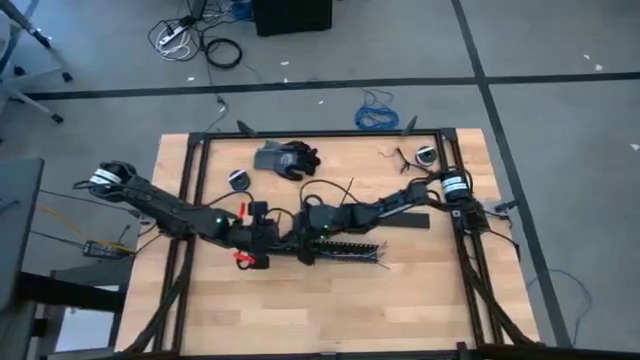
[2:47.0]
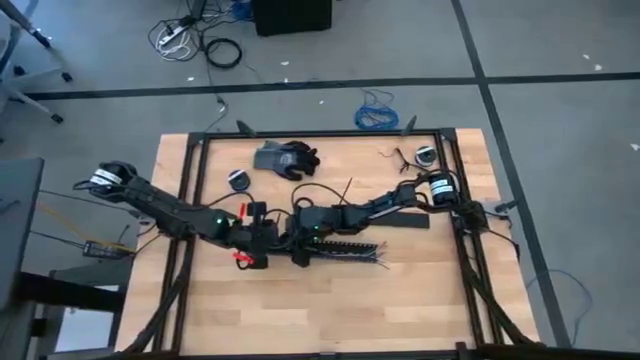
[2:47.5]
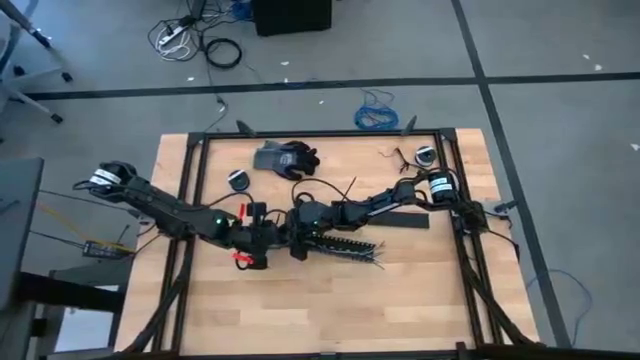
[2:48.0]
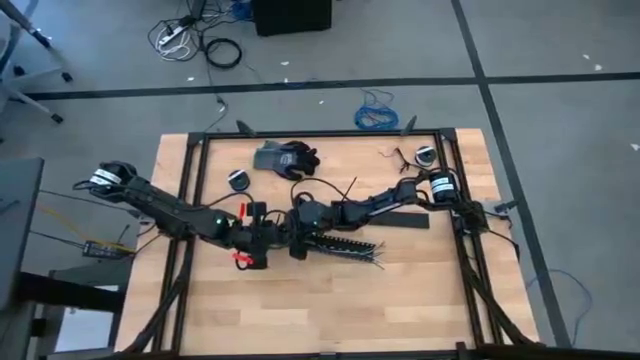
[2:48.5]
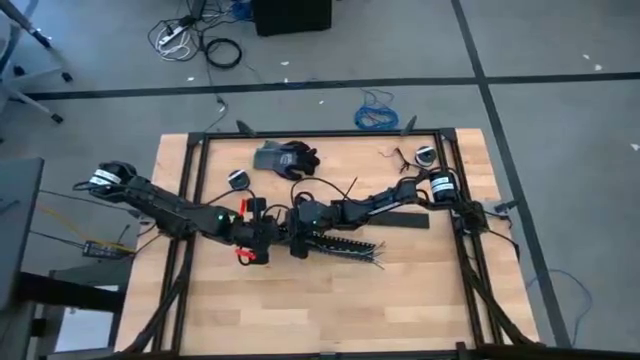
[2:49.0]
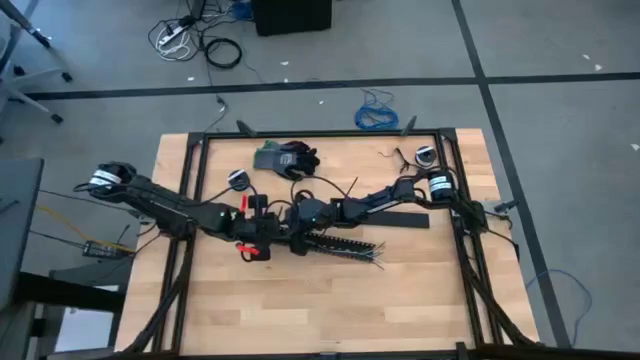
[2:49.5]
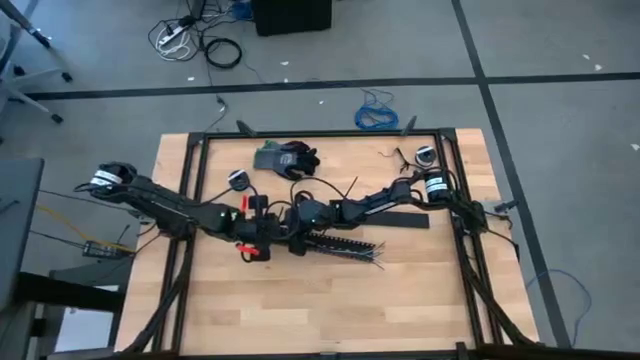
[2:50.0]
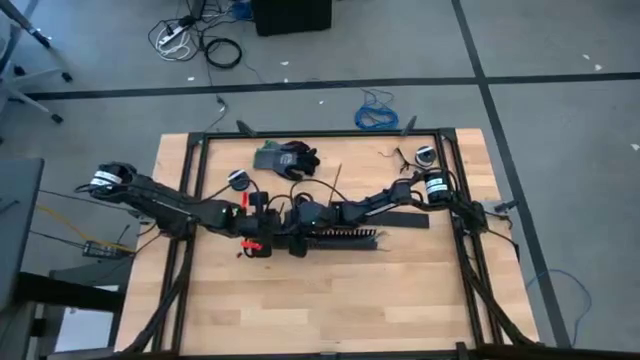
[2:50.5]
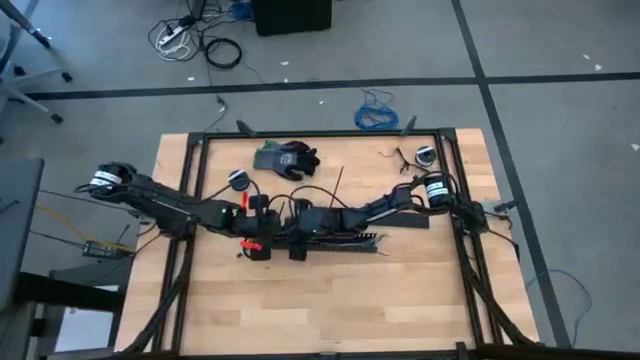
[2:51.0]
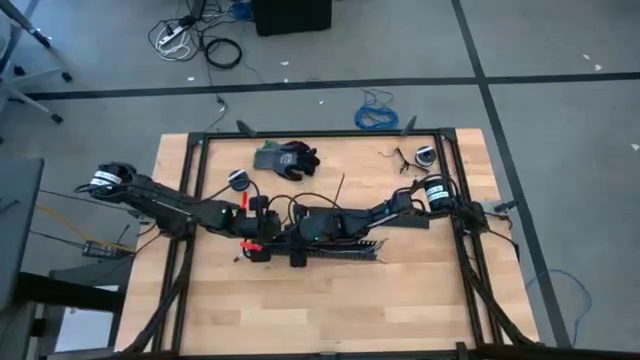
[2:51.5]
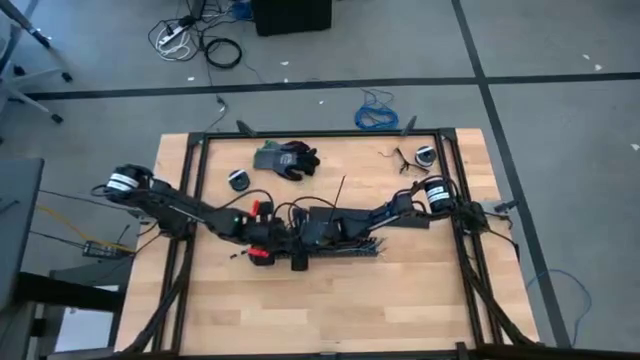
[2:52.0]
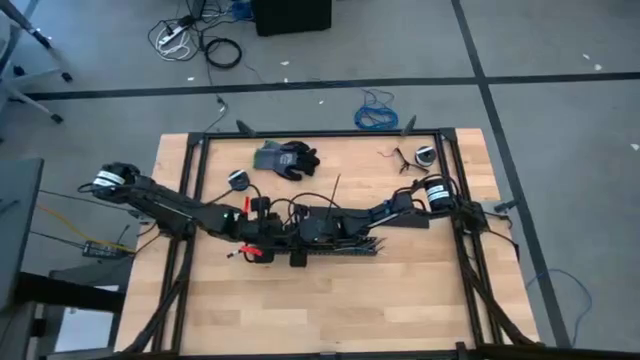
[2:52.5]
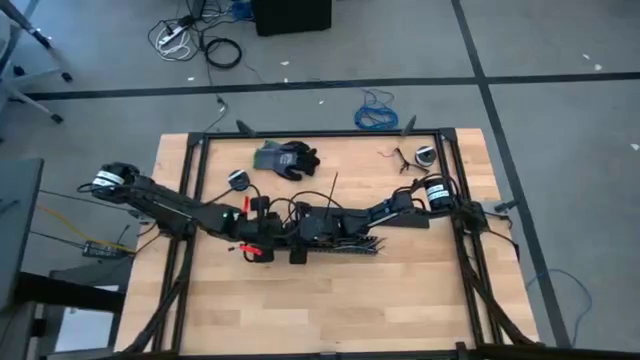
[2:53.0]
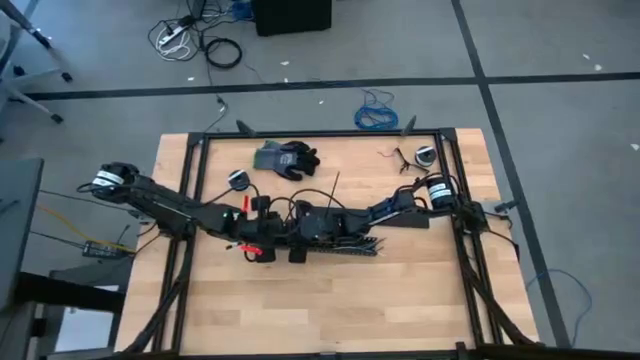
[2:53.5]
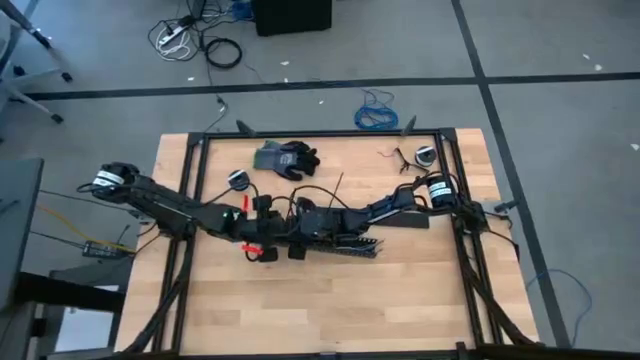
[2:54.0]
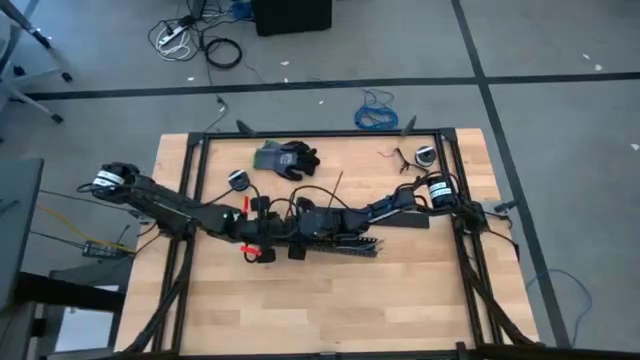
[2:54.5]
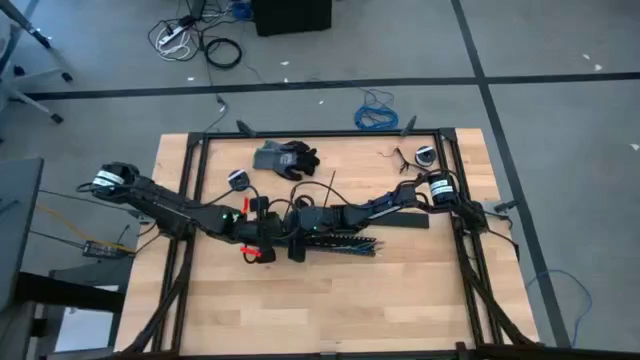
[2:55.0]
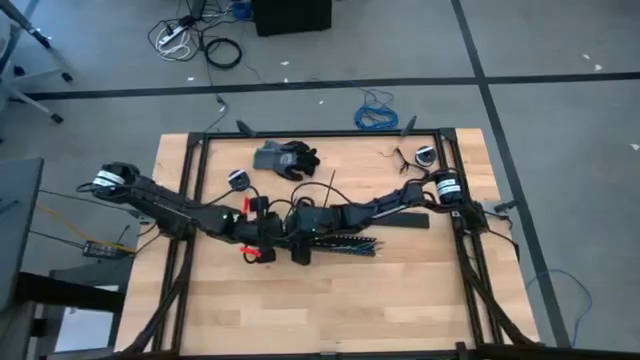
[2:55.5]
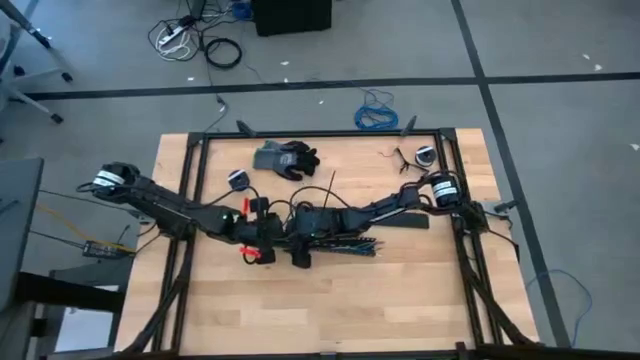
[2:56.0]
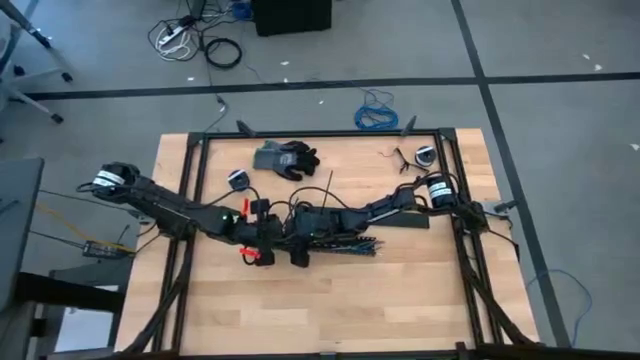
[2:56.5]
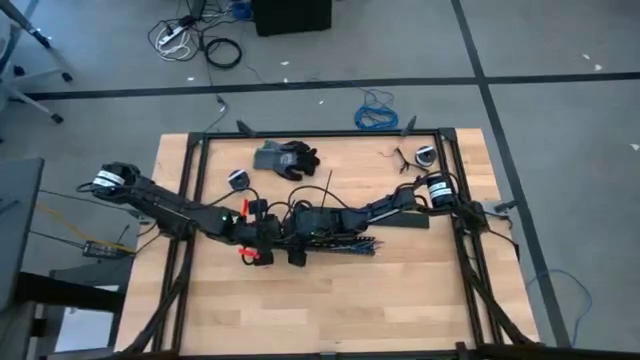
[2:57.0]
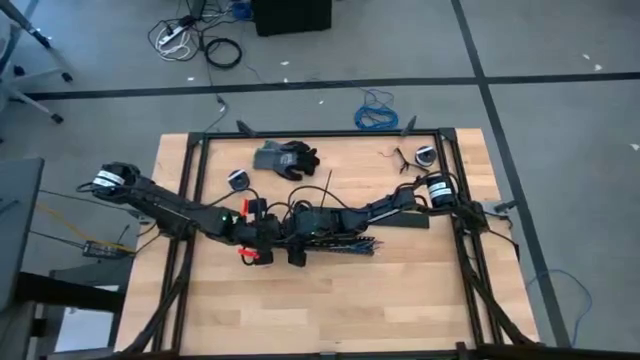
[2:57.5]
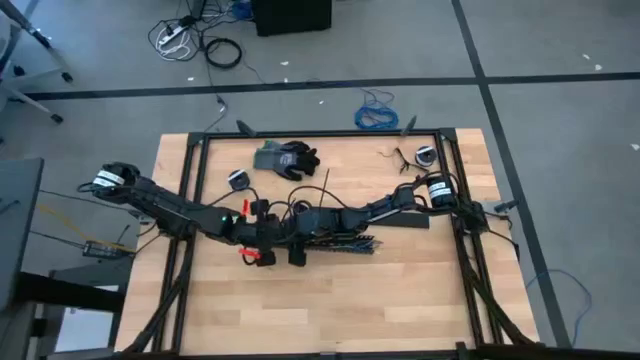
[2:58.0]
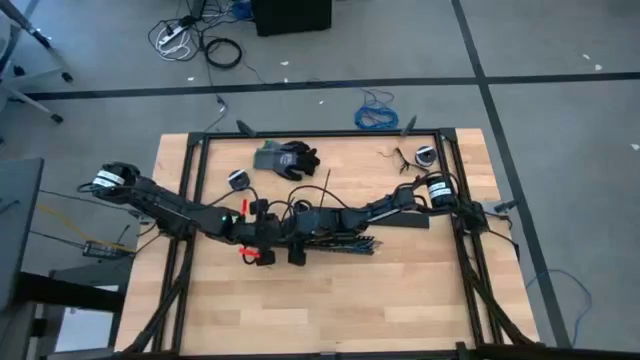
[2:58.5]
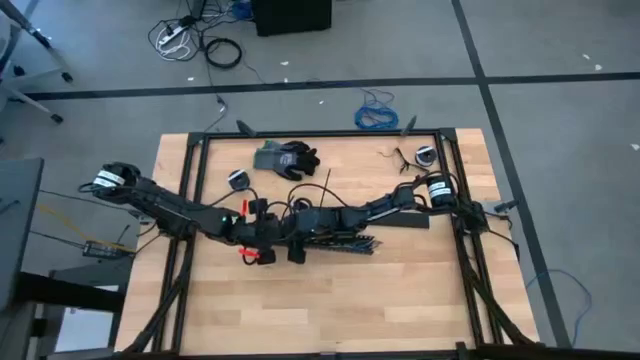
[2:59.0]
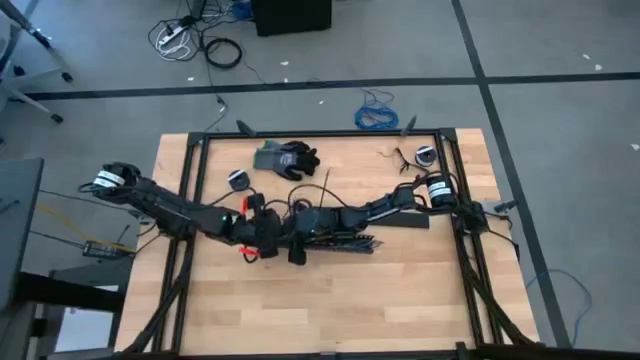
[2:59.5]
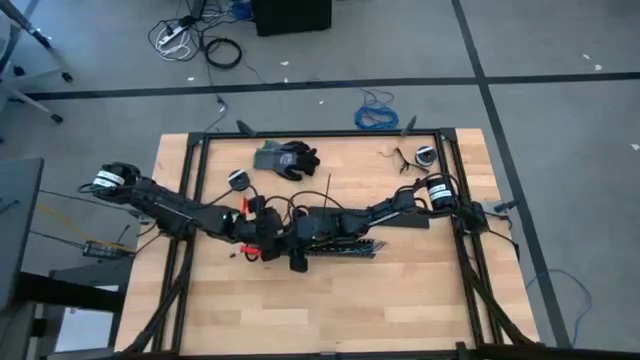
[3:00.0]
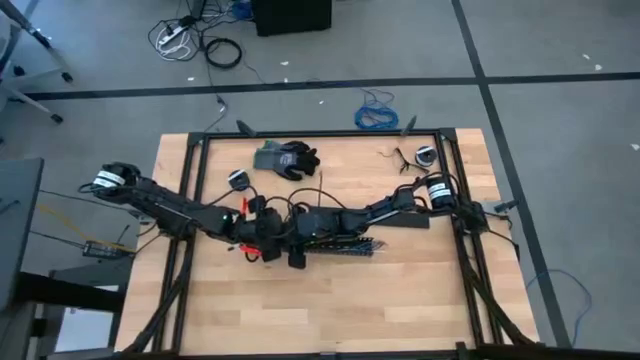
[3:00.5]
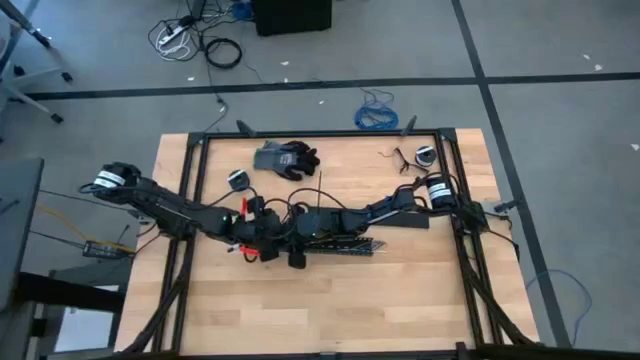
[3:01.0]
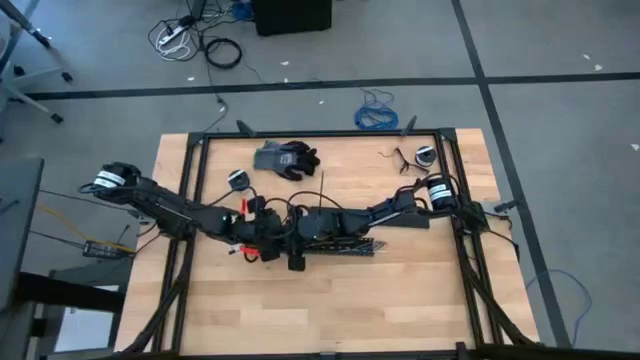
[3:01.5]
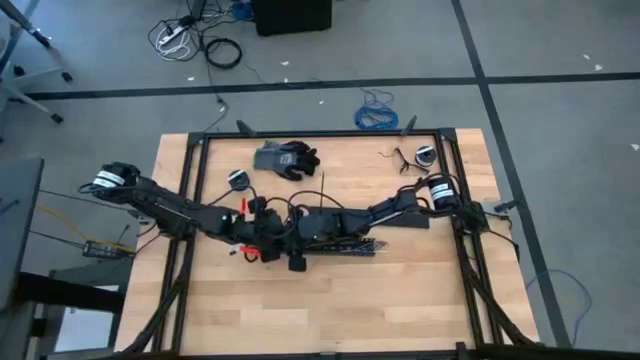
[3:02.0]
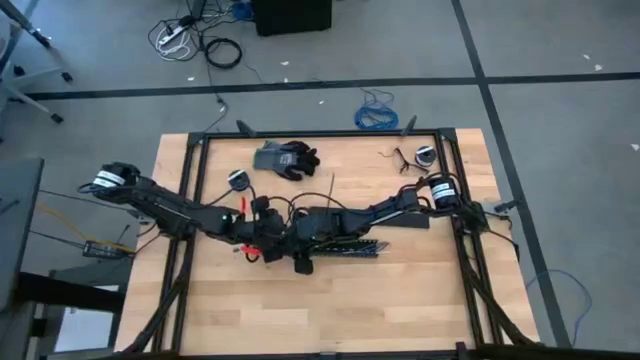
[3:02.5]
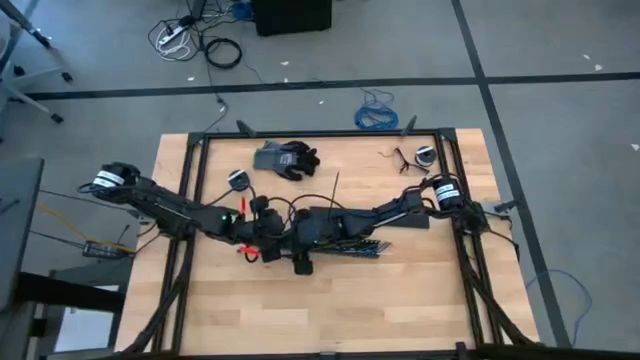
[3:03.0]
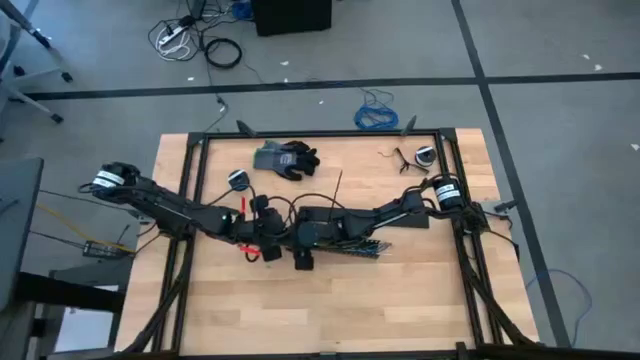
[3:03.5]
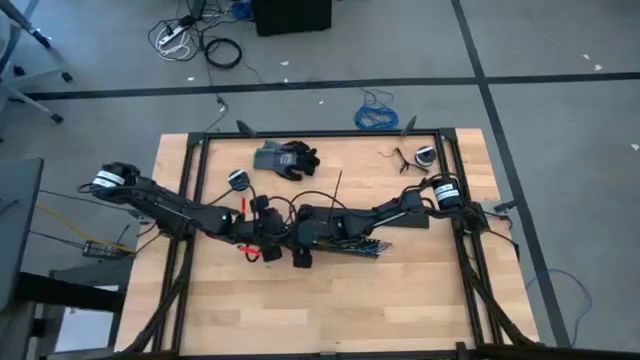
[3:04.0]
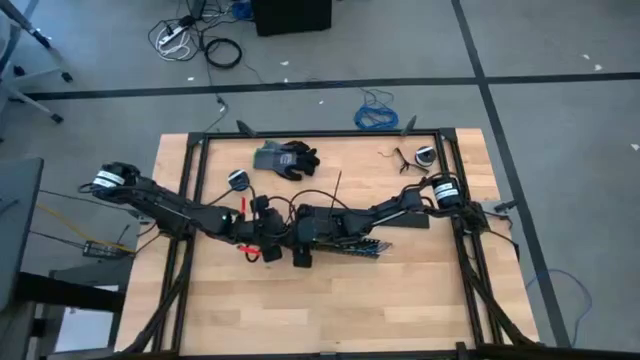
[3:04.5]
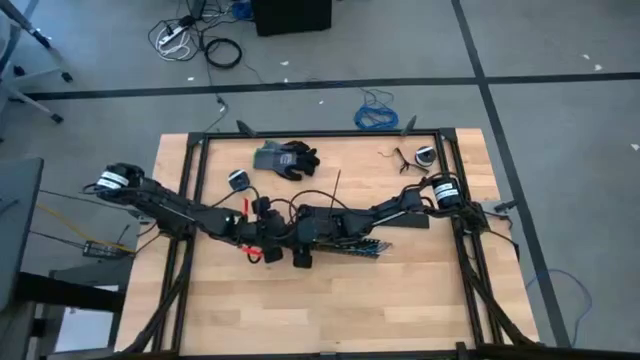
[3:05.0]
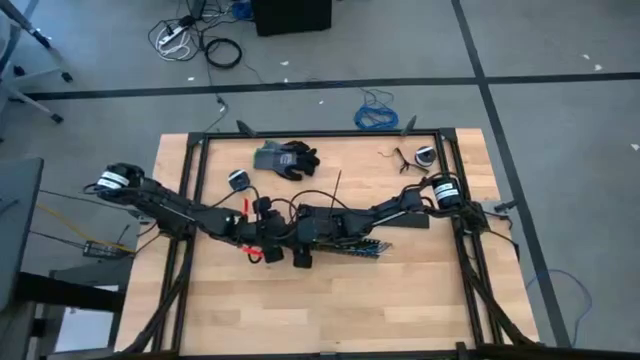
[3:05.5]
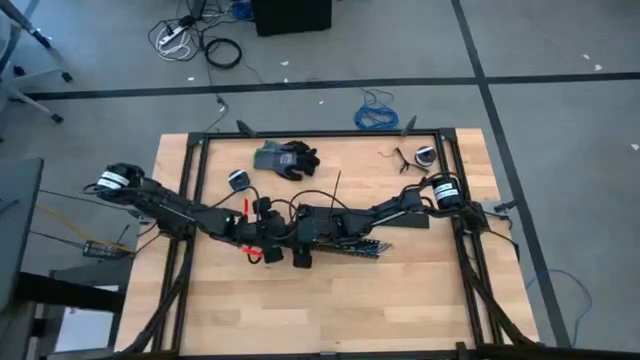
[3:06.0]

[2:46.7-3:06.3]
Task: Ziptie cables
Put the cable wires in the black cable duct

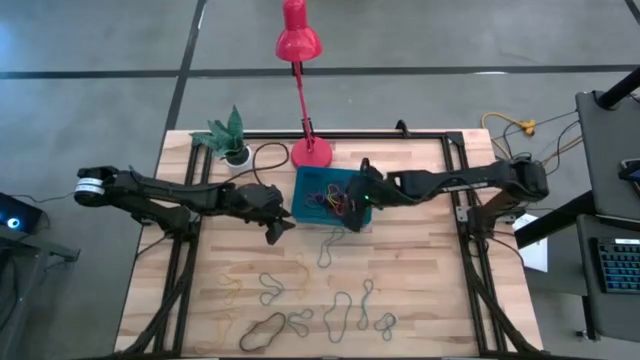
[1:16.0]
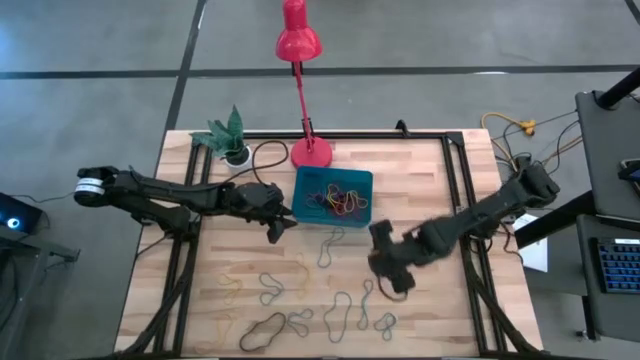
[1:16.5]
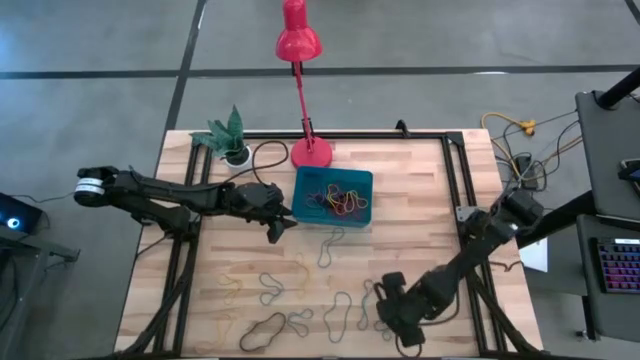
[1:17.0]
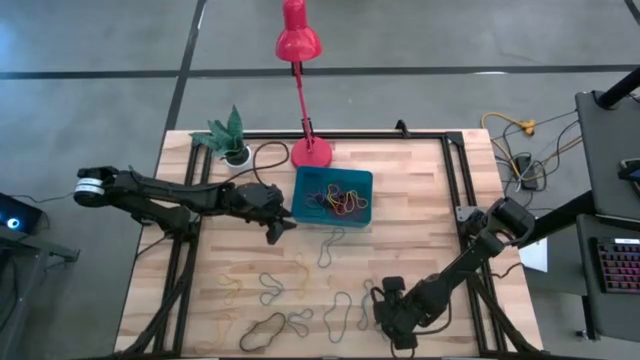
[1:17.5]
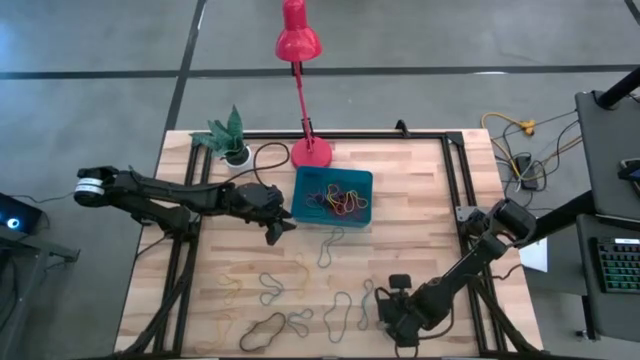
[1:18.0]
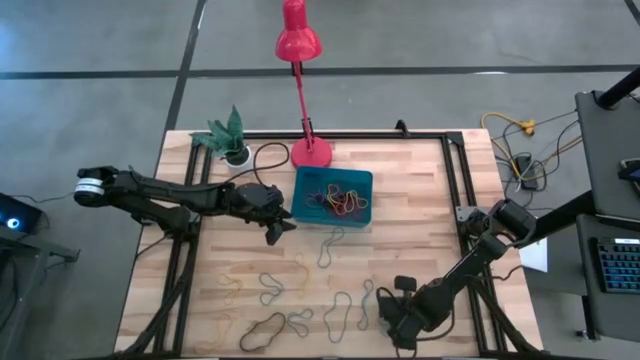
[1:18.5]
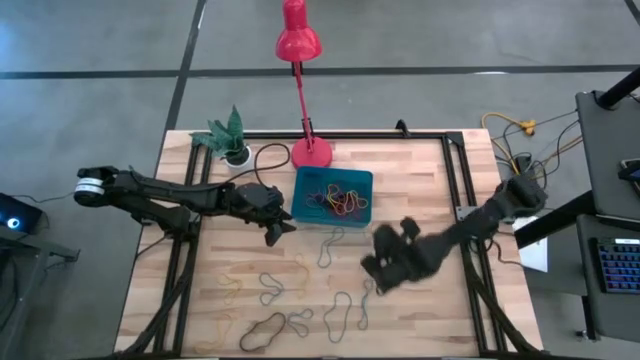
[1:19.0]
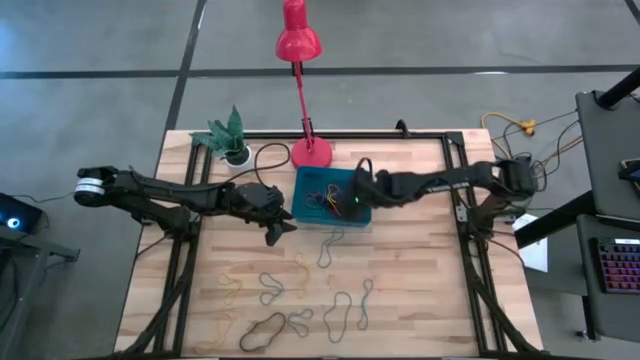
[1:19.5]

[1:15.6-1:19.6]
Task: Pick and place rubber bands into bin
Put the blue rubber band into the blue bin
